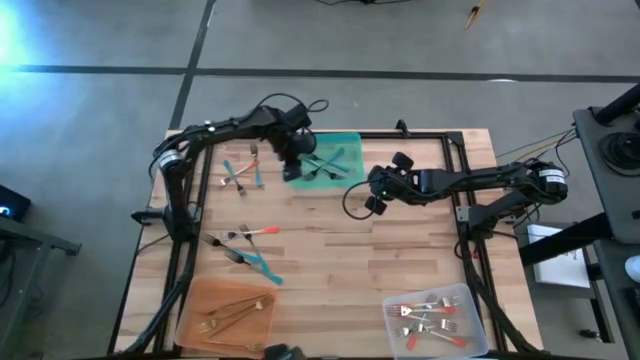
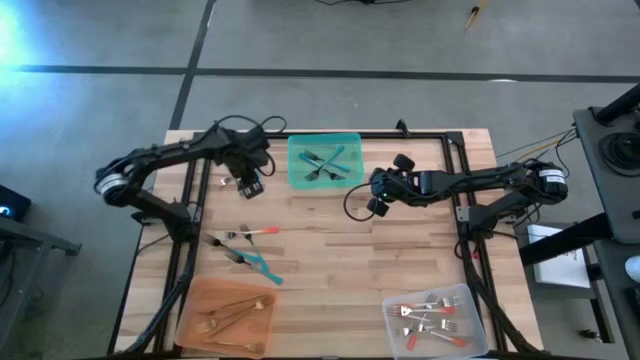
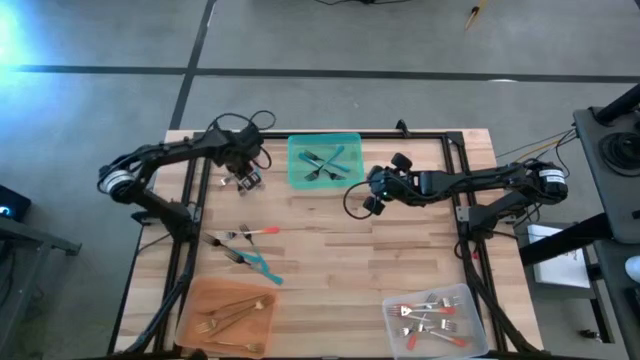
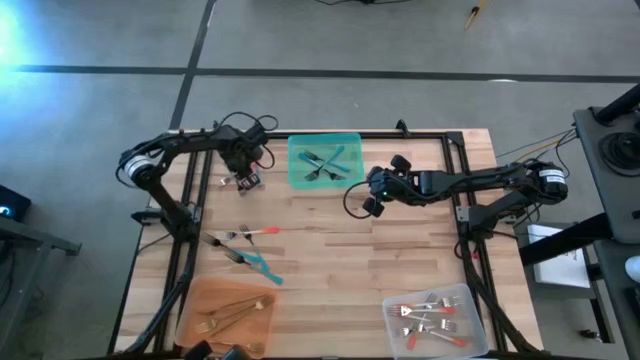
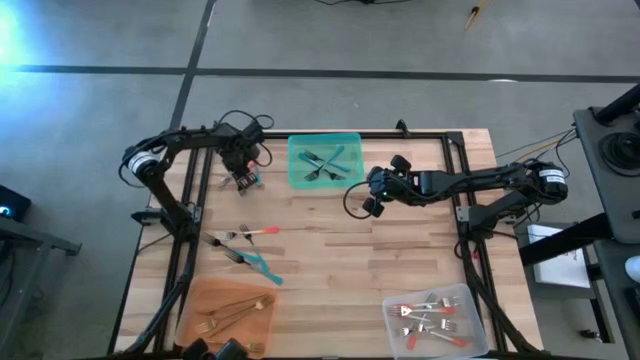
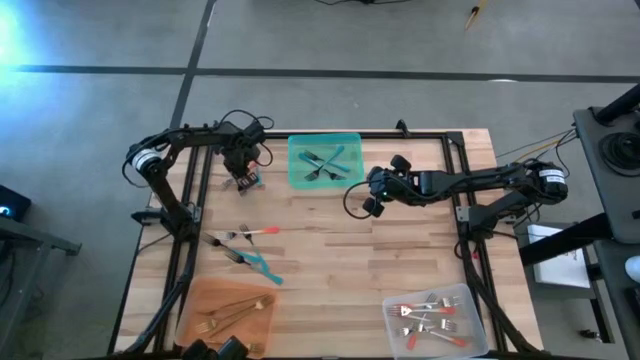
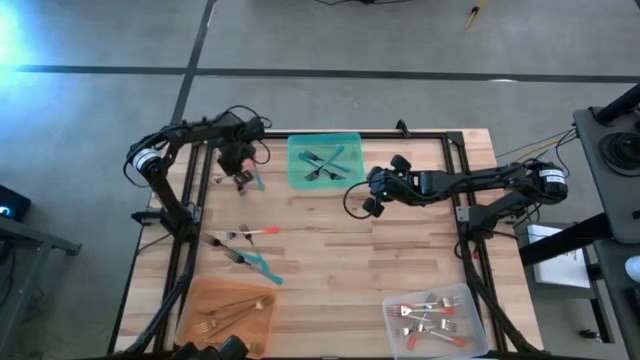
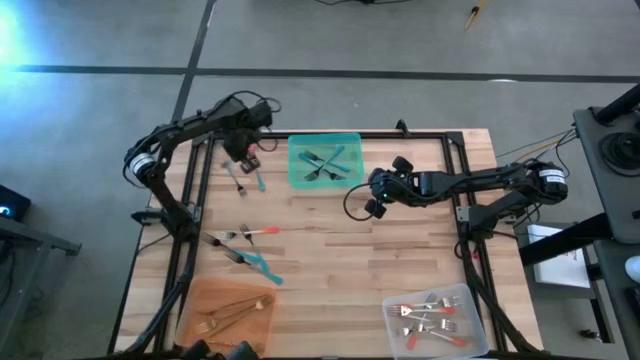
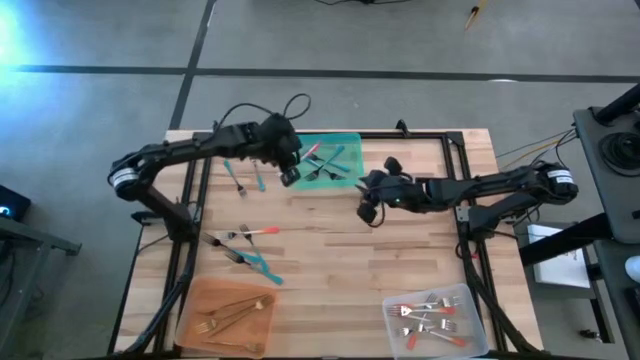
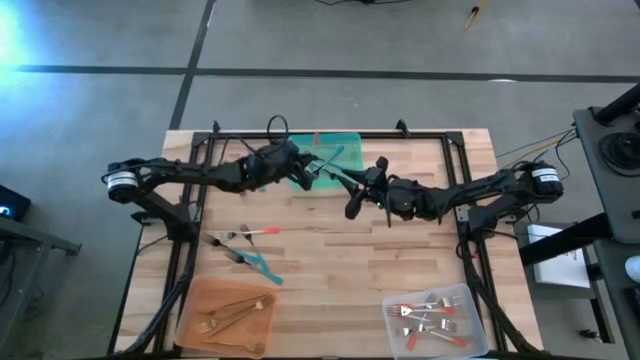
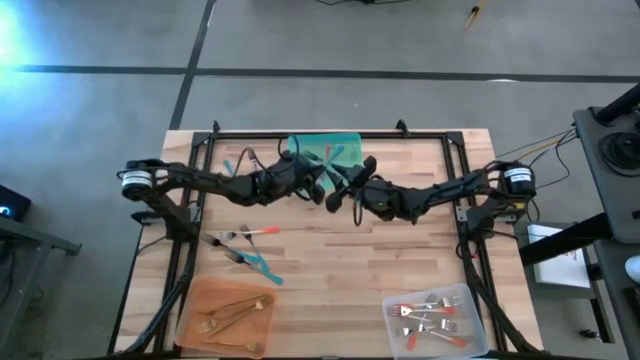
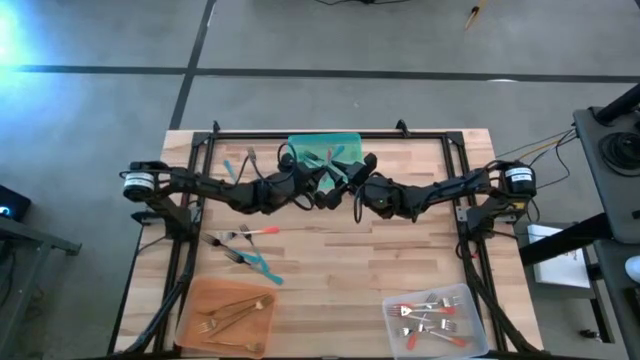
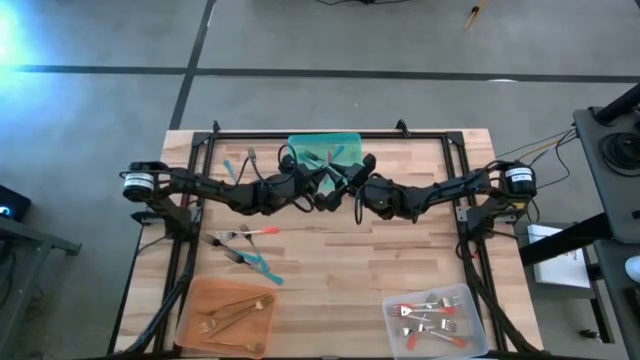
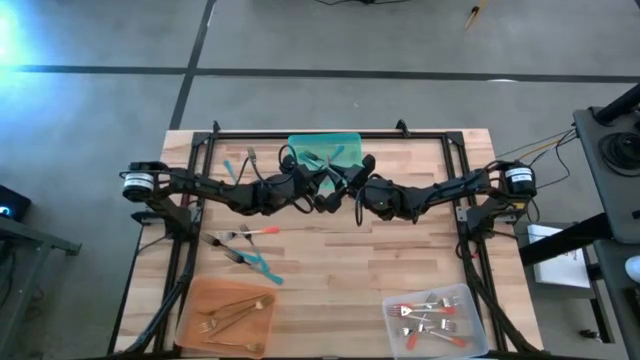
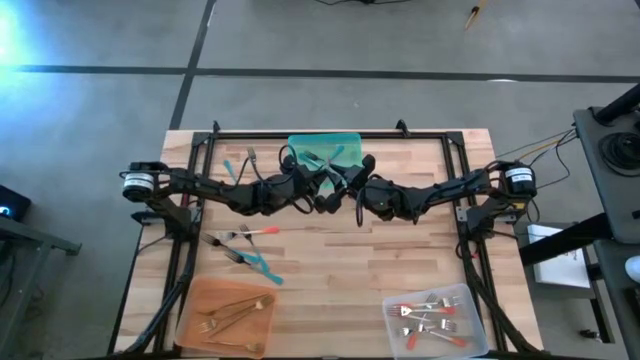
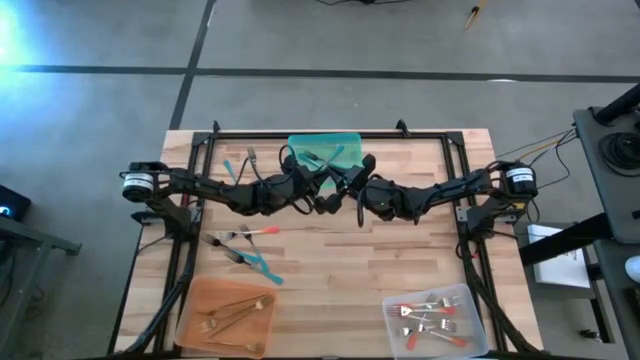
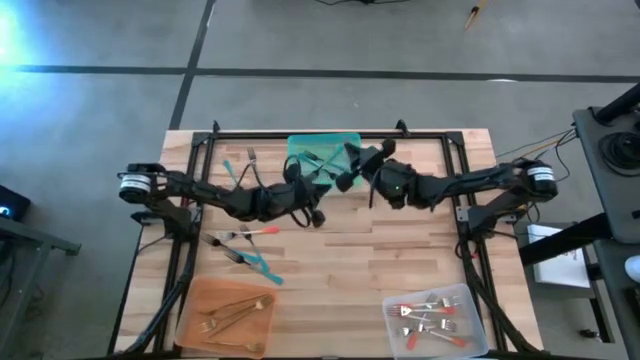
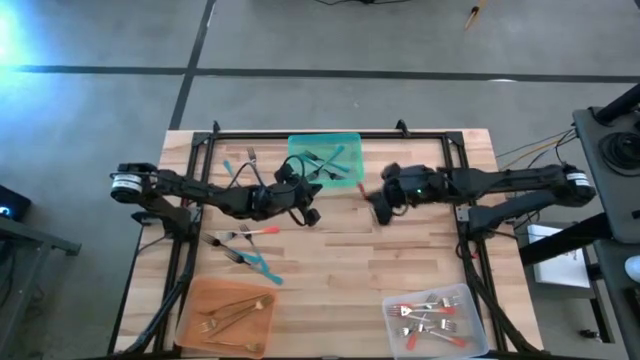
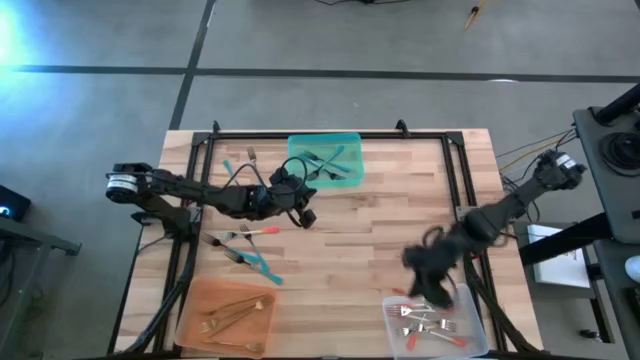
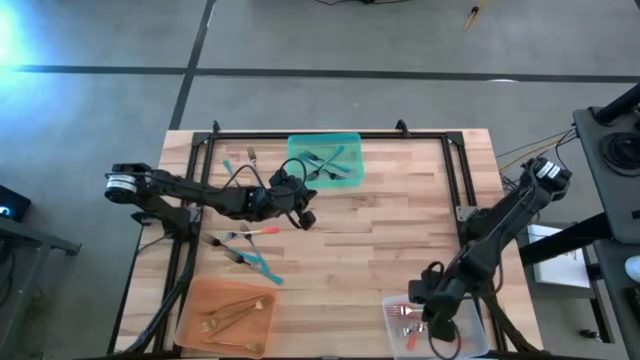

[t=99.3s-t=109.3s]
Task: Sort silverware by color (type)
Put the orange fork into the transparent bin

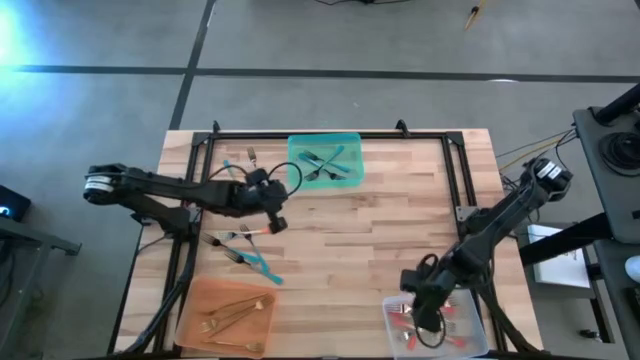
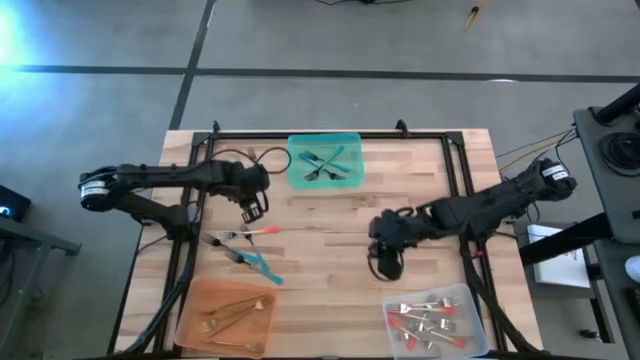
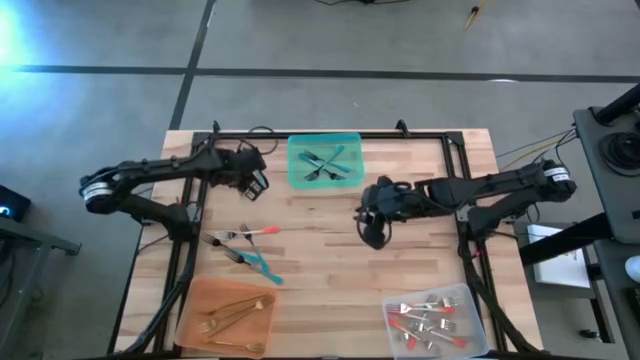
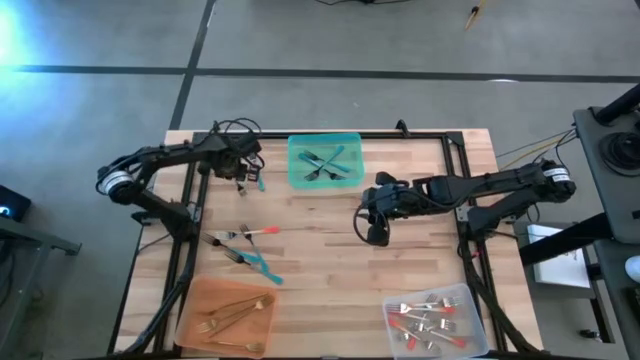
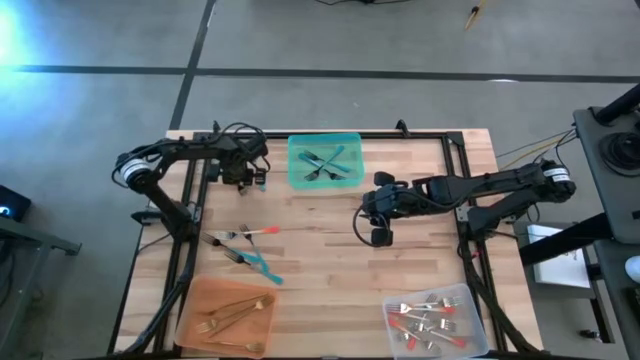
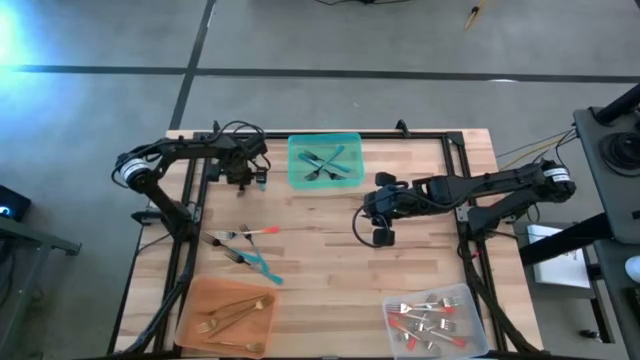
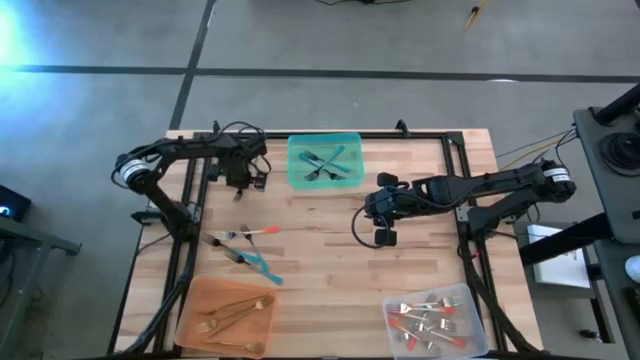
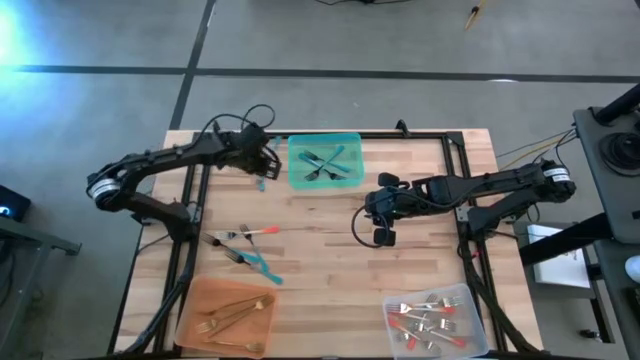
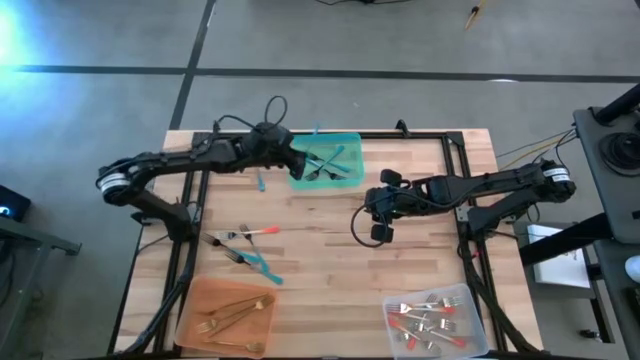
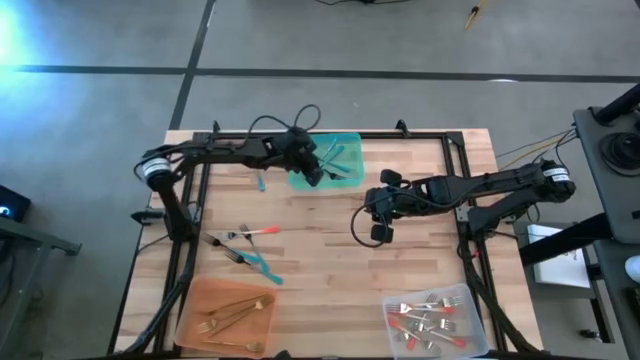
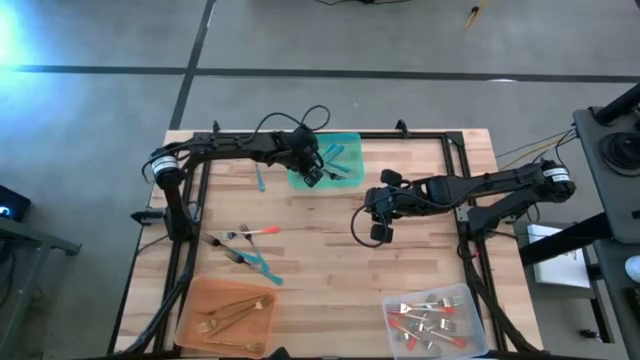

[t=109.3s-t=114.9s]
Put the blue fork into the blue bin

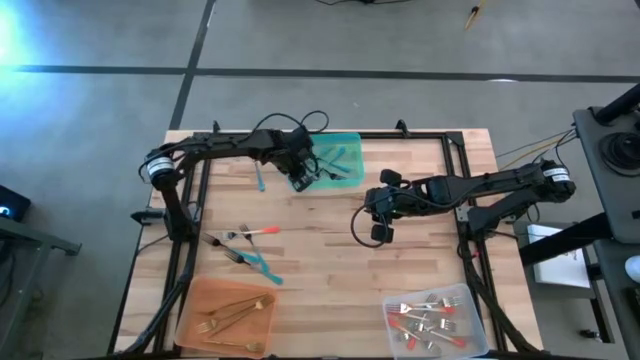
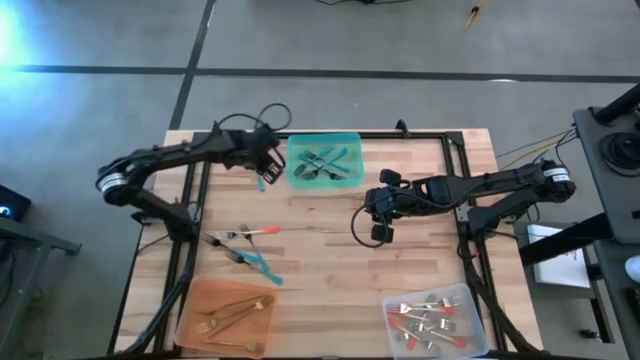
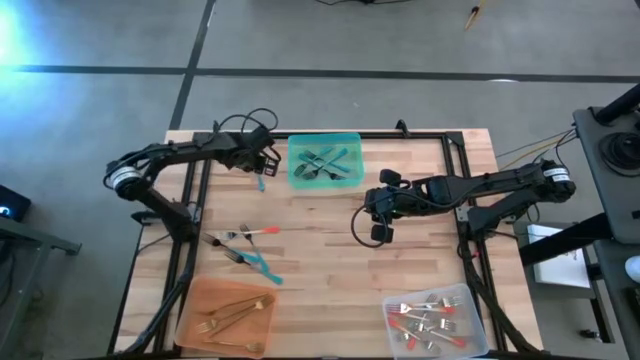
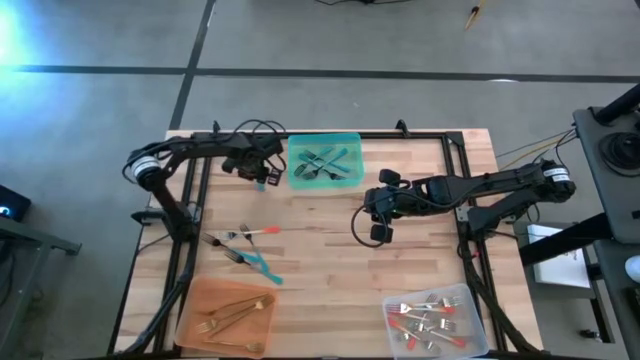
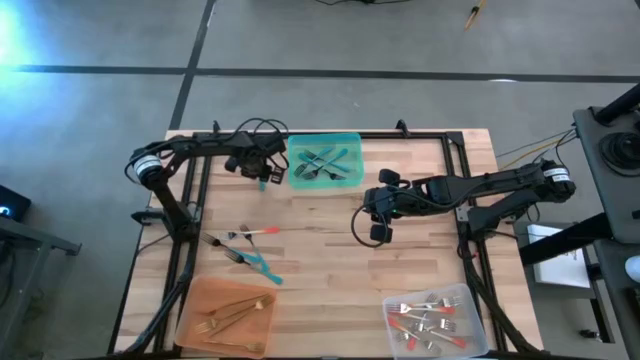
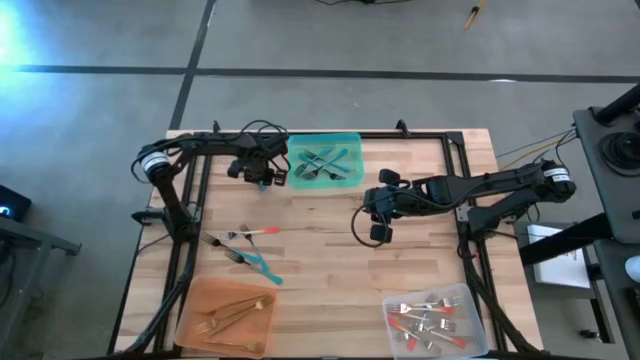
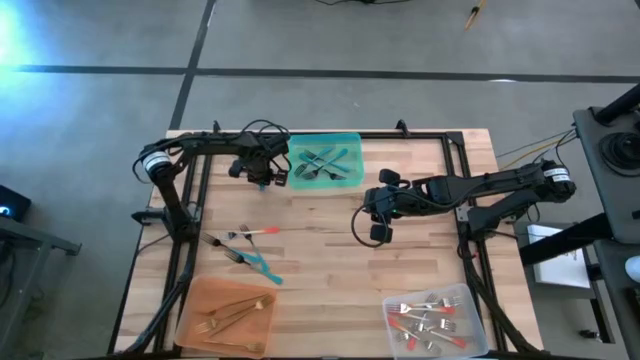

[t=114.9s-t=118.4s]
Put the blue fork into the blue bin

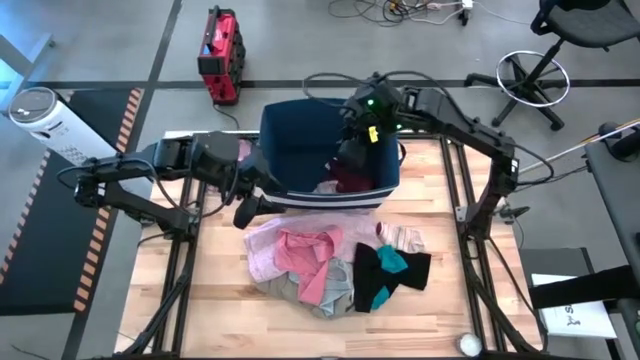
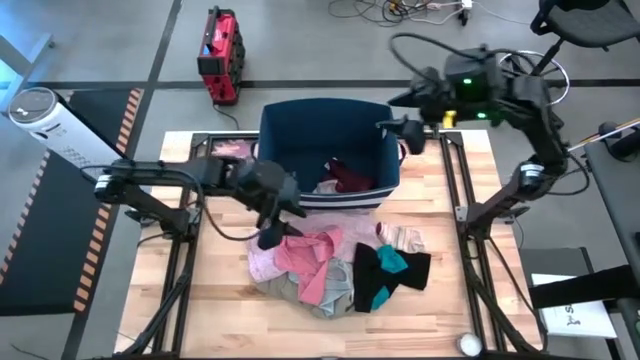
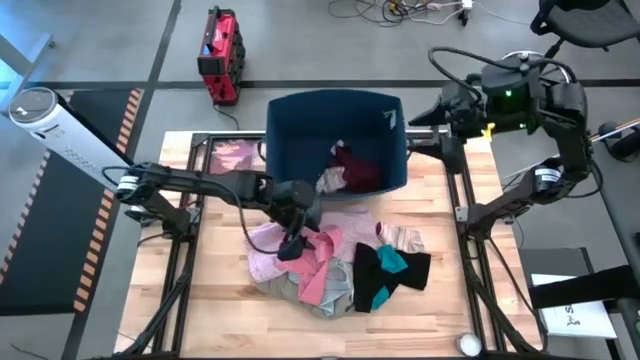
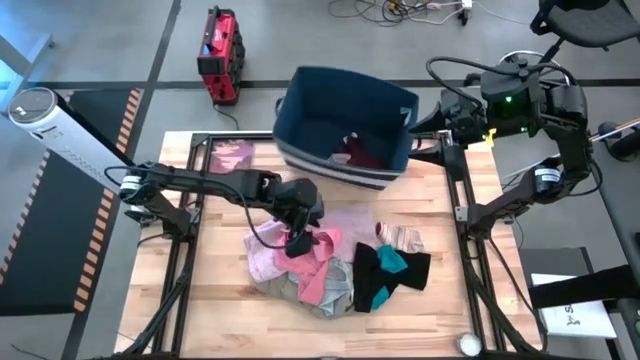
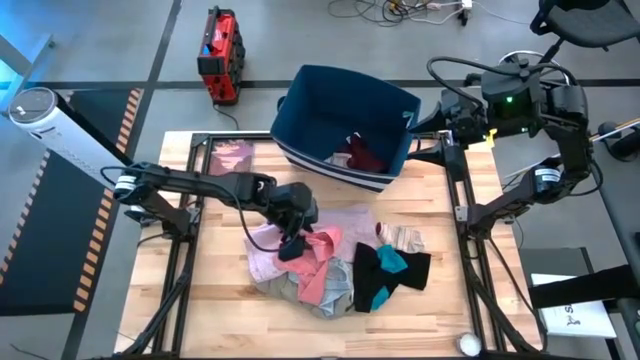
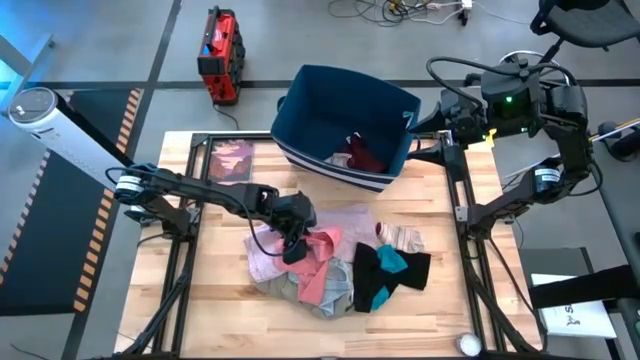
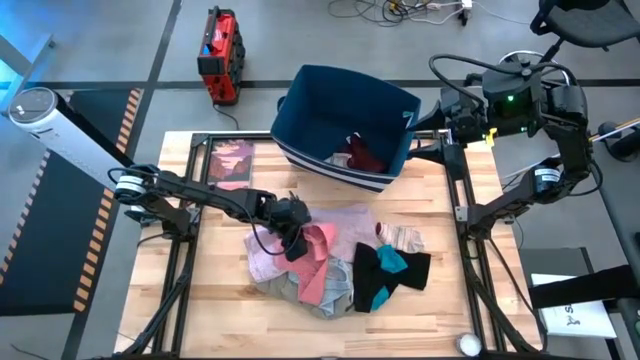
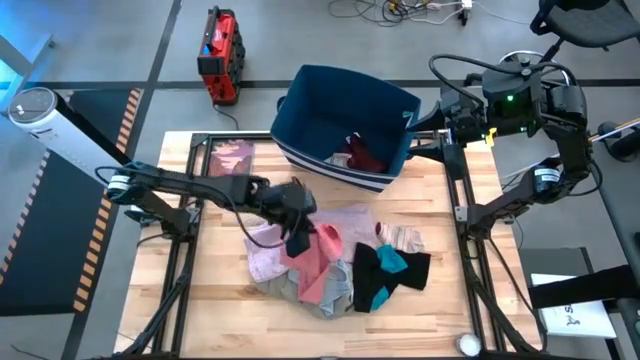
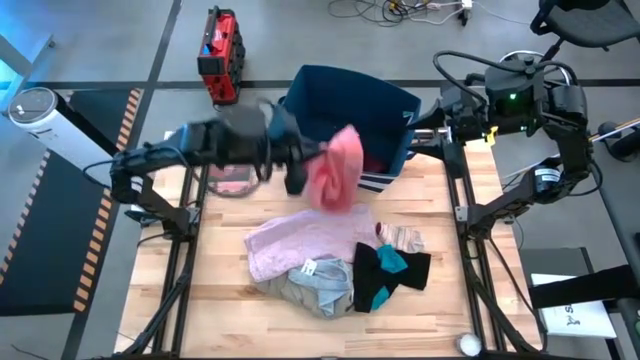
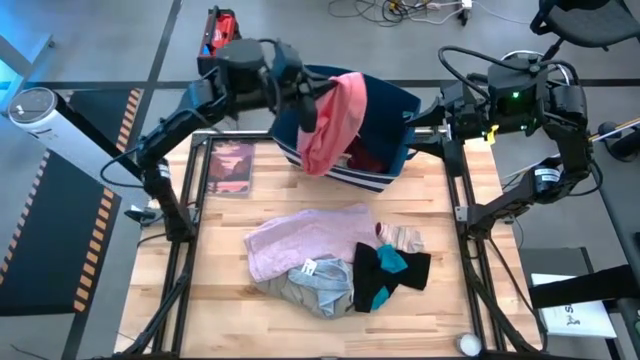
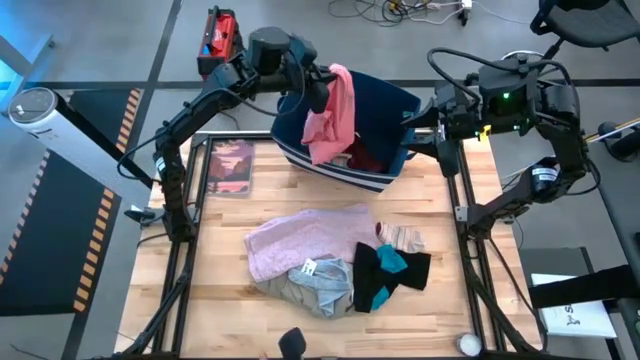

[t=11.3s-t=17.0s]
Task: Sort clothes
Put the pink underwear into the blue laundry bin
